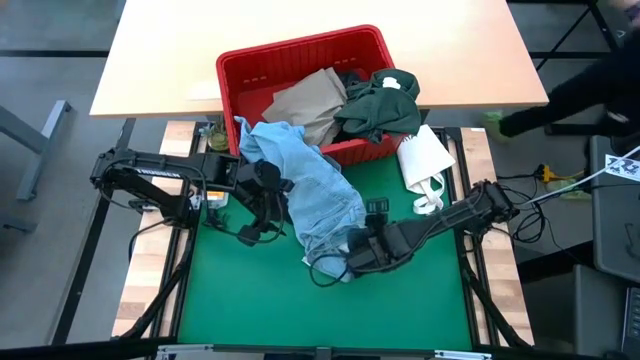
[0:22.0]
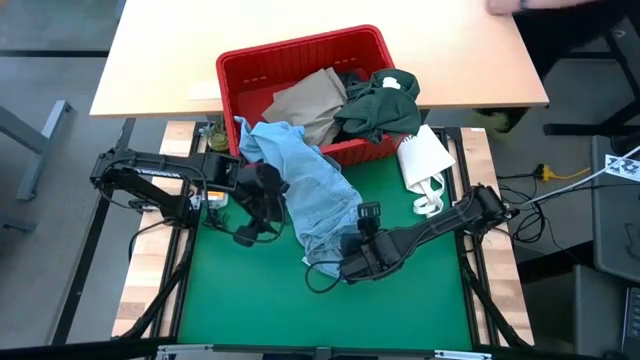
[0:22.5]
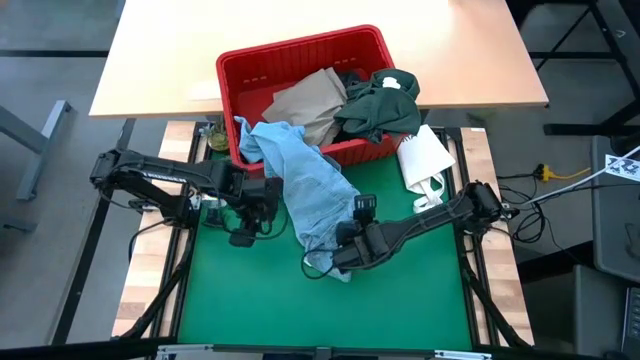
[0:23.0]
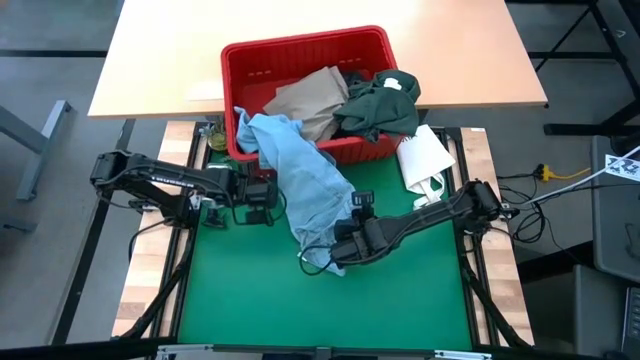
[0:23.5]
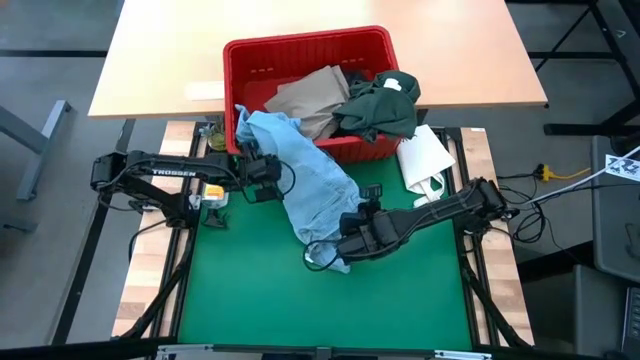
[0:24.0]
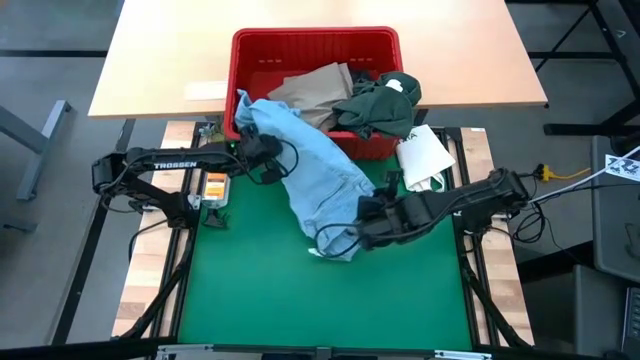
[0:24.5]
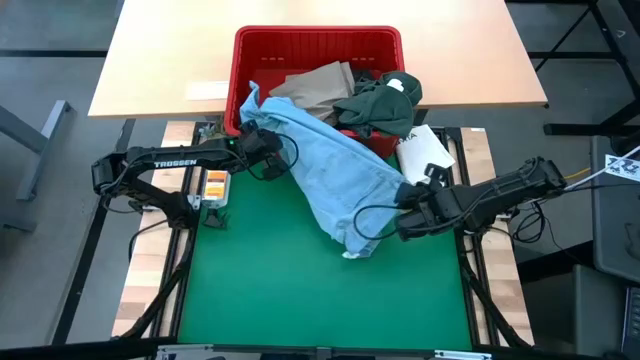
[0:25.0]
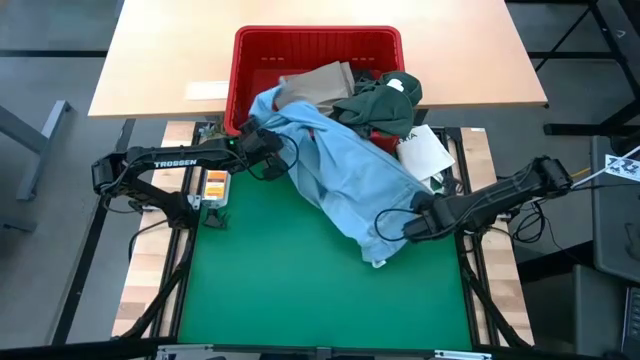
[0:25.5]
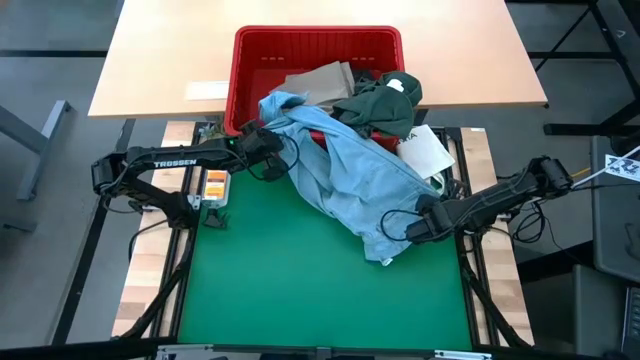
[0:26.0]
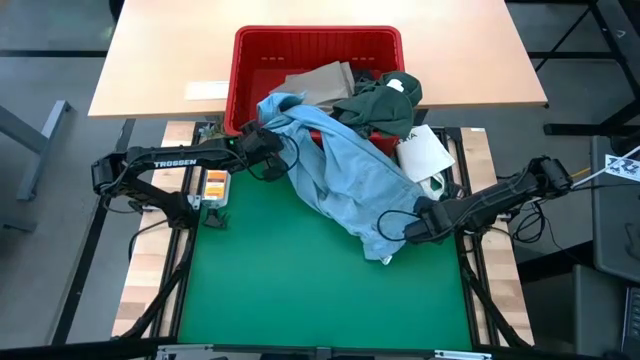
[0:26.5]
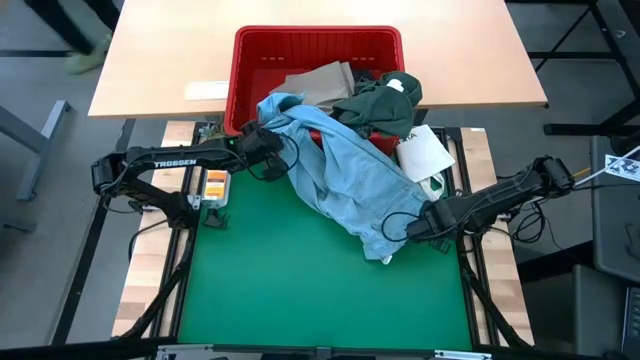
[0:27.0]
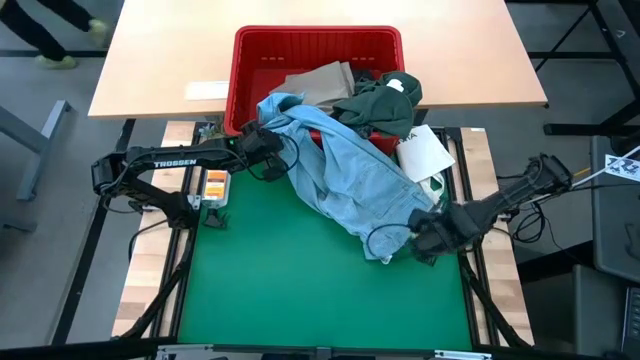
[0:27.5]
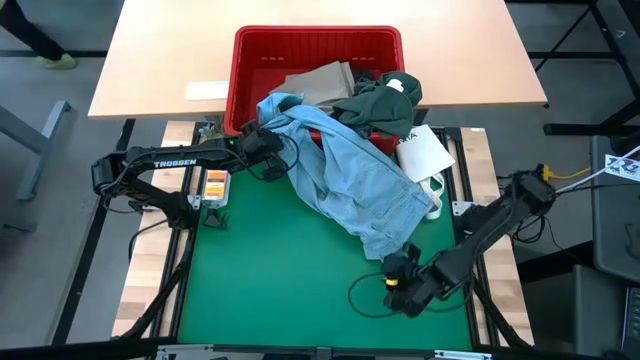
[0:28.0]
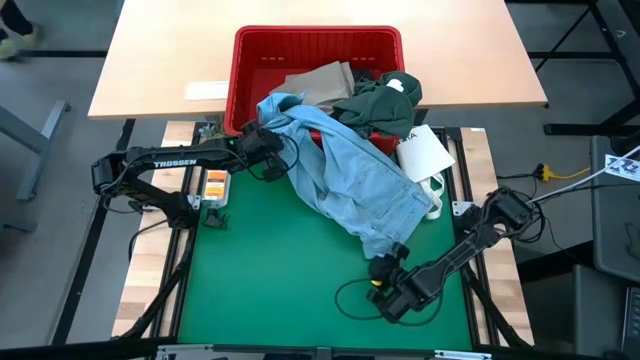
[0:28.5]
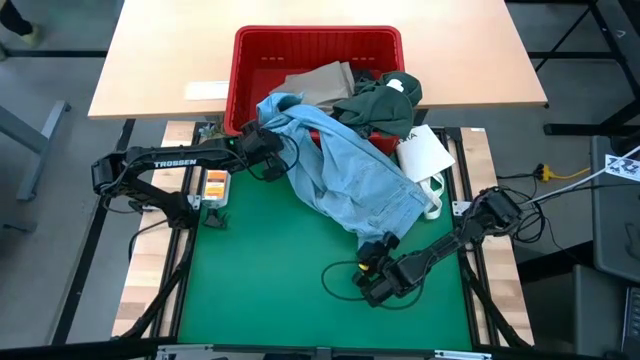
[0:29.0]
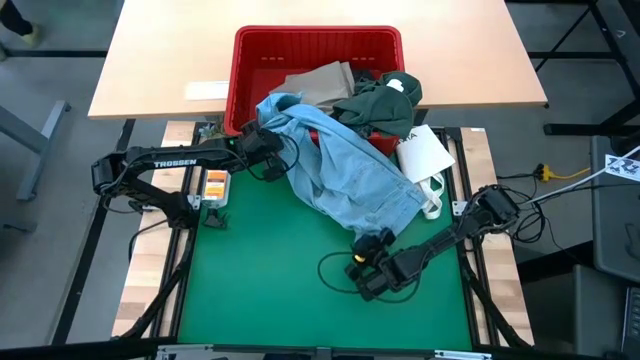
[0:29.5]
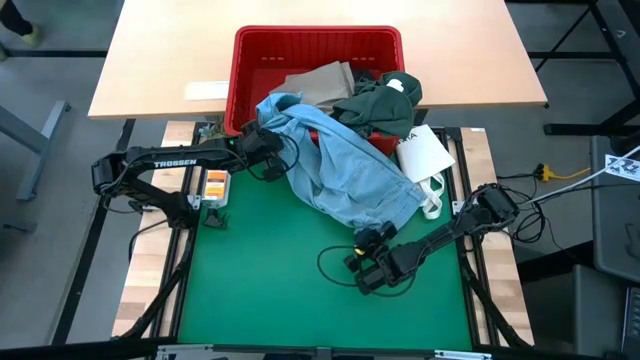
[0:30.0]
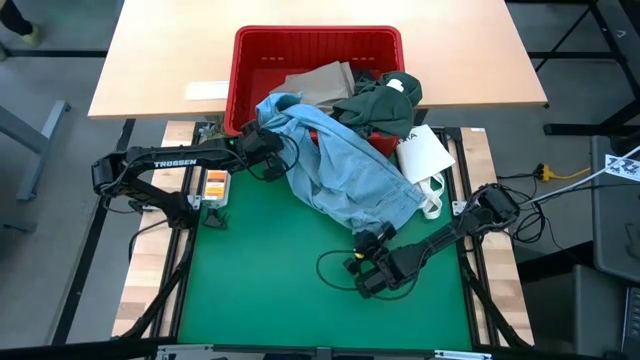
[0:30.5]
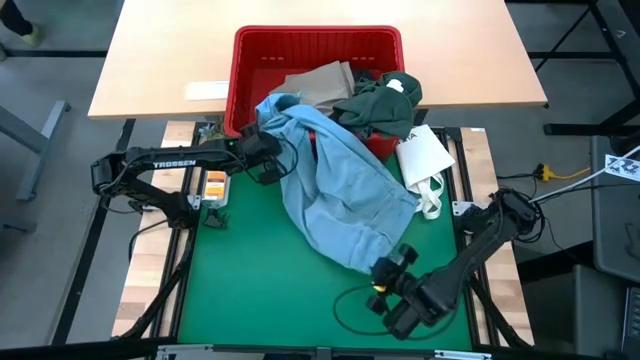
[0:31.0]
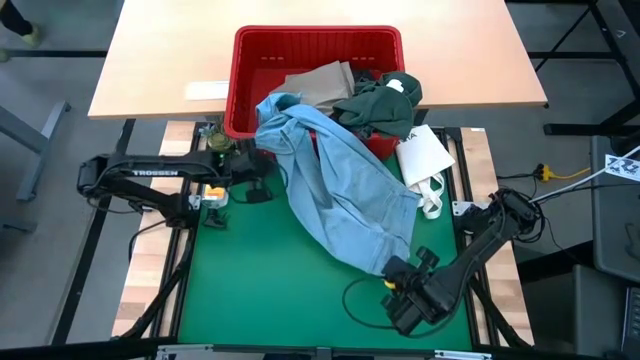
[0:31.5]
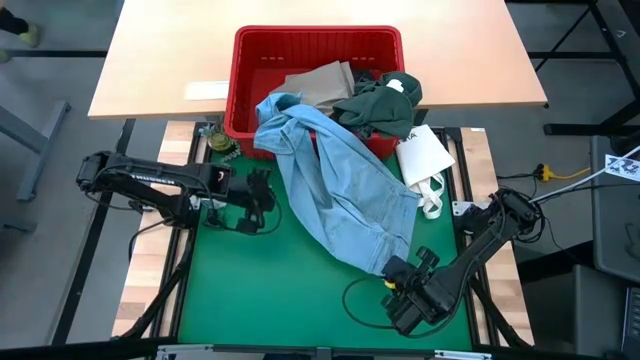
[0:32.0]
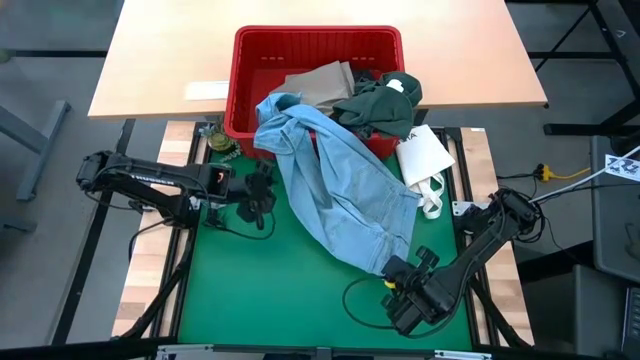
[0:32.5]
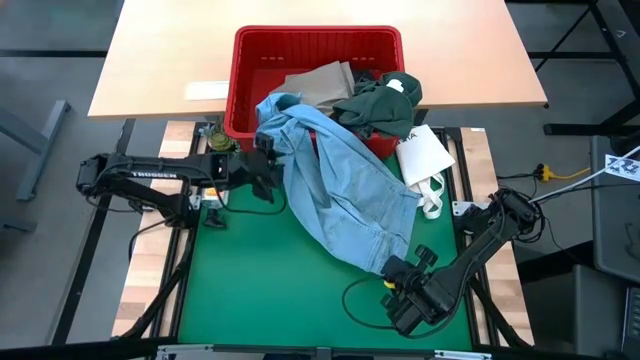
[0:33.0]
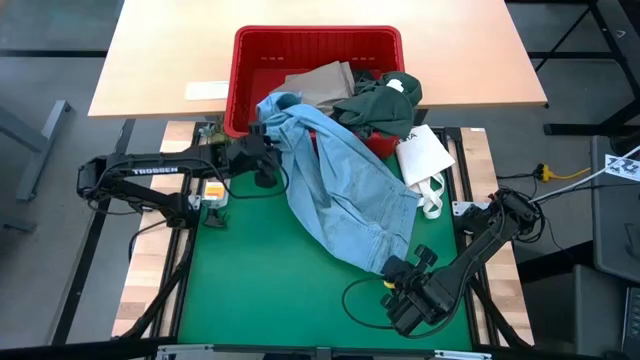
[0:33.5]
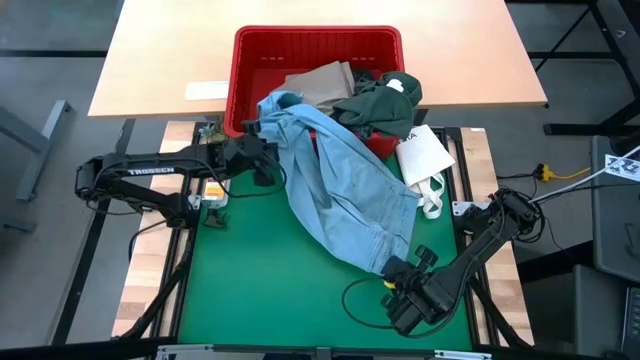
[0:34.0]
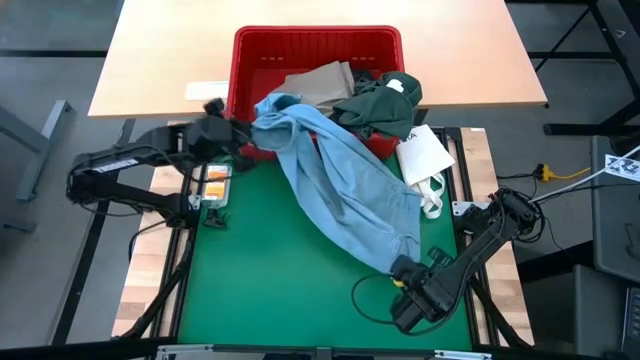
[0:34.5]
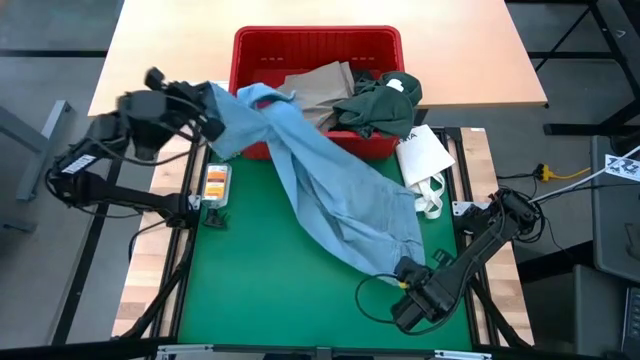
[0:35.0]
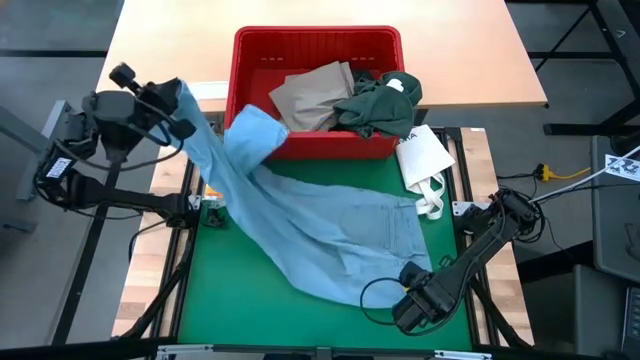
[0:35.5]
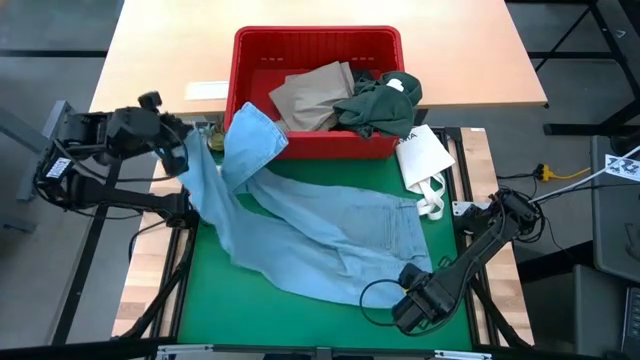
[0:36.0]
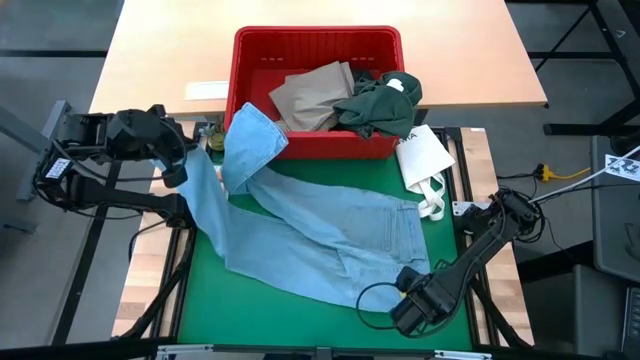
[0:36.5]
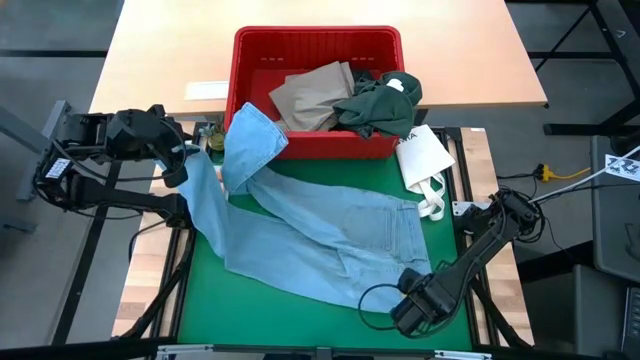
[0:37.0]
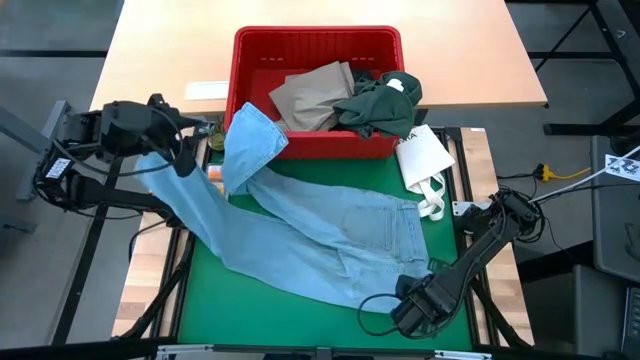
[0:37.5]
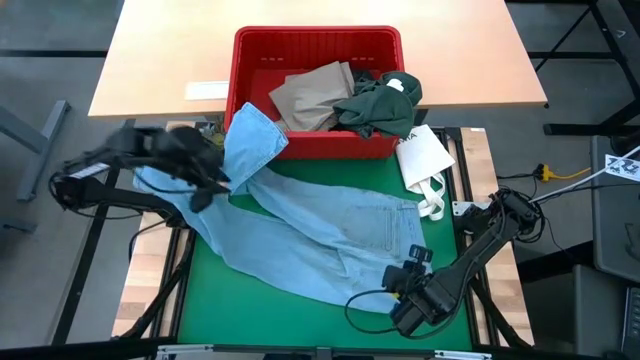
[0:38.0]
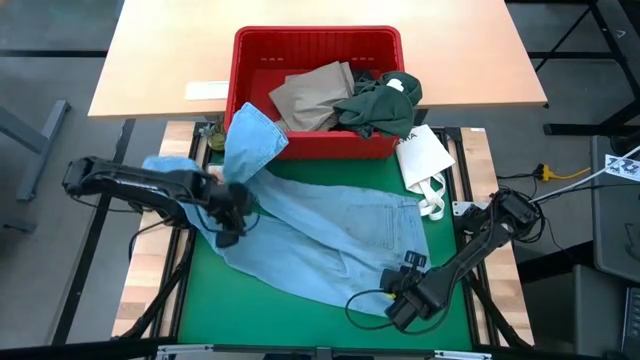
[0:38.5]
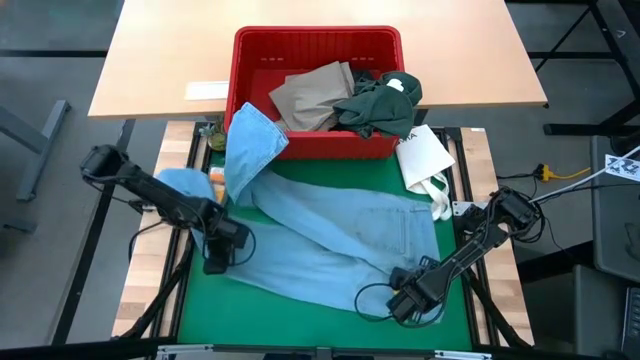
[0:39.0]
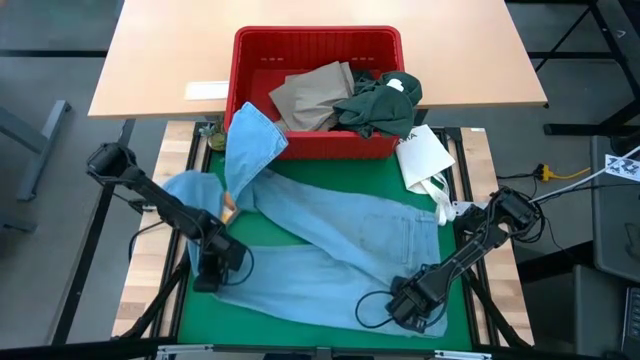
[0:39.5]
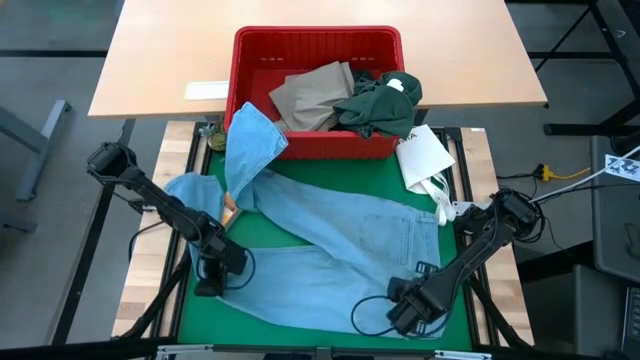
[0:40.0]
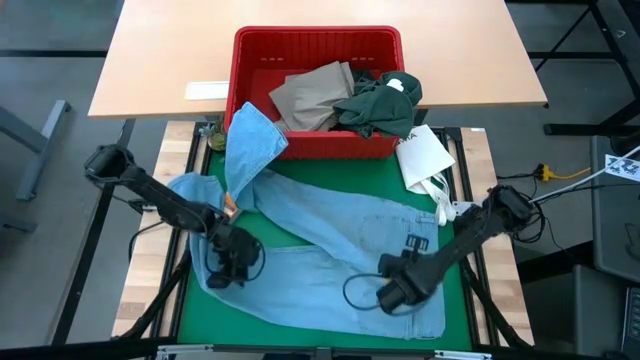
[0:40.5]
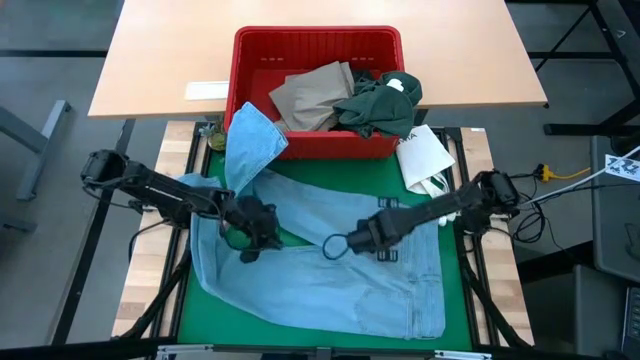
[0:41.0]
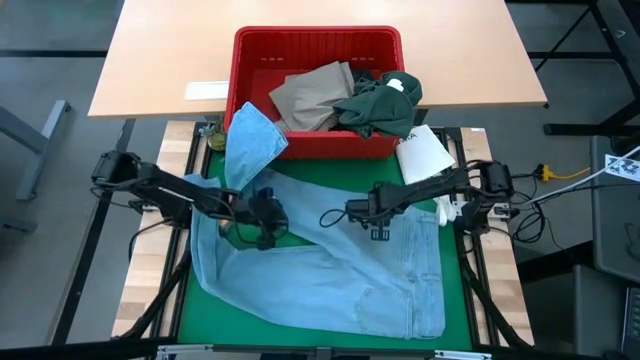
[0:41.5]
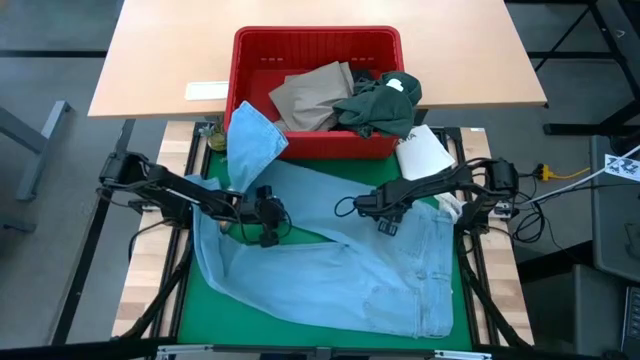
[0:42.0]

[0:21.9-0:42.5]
Task: Fold Laundry from Bin
Fold the blue pants
